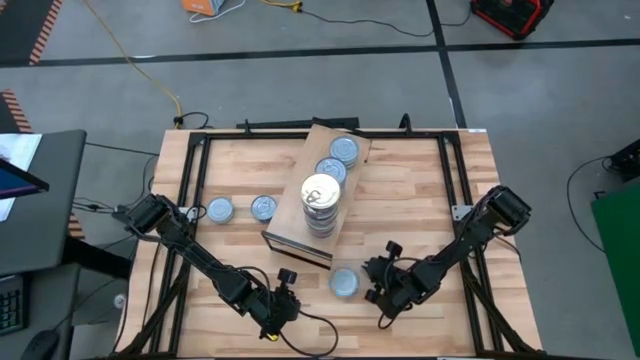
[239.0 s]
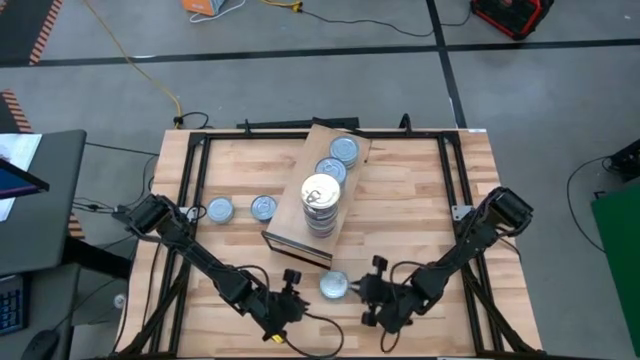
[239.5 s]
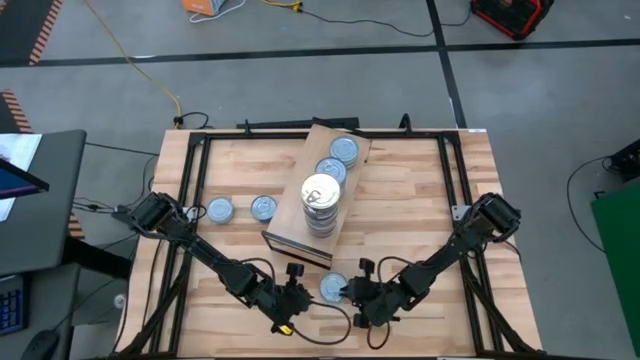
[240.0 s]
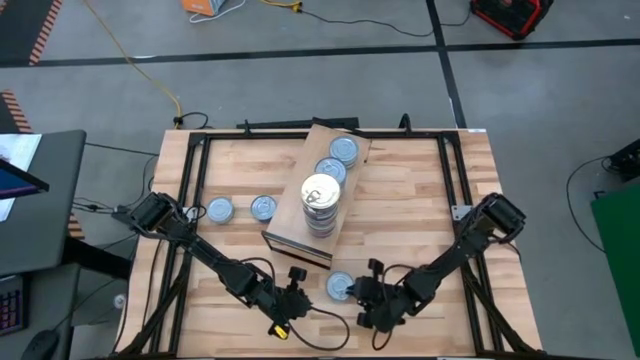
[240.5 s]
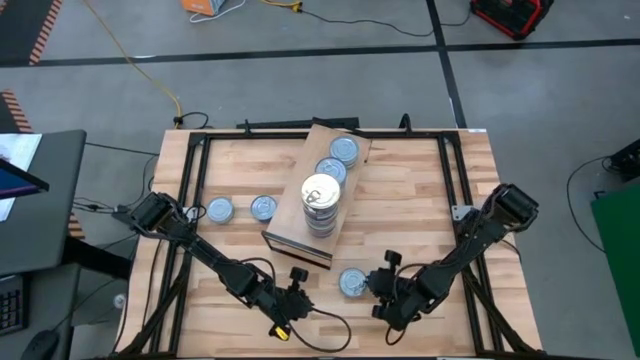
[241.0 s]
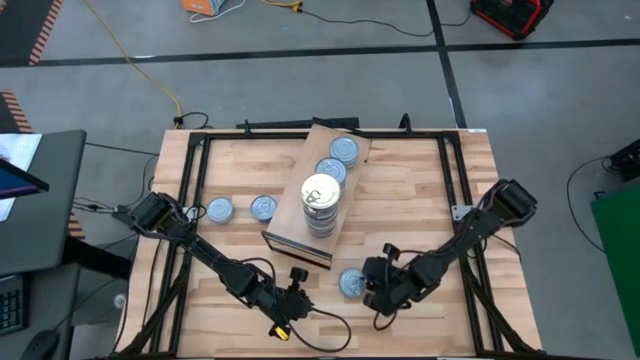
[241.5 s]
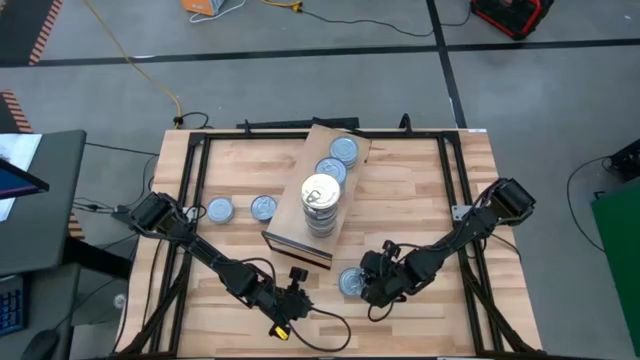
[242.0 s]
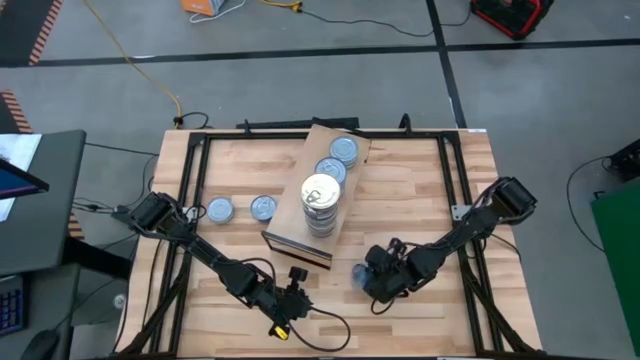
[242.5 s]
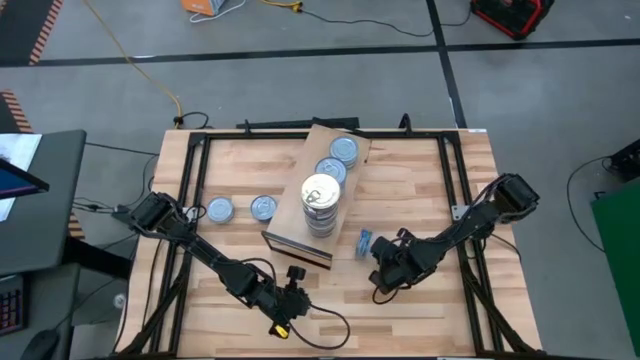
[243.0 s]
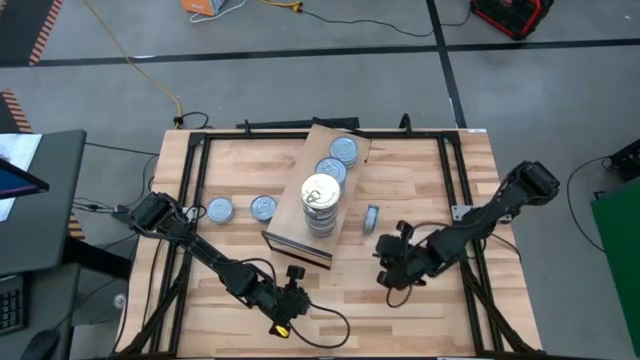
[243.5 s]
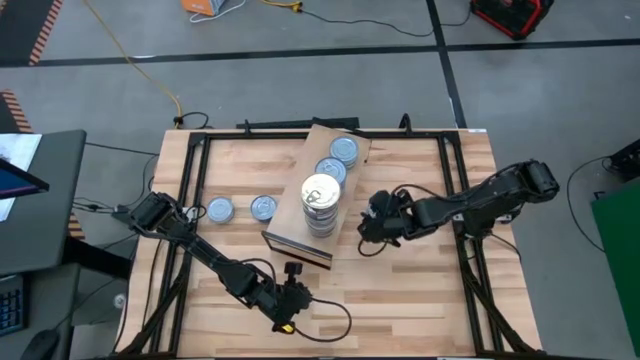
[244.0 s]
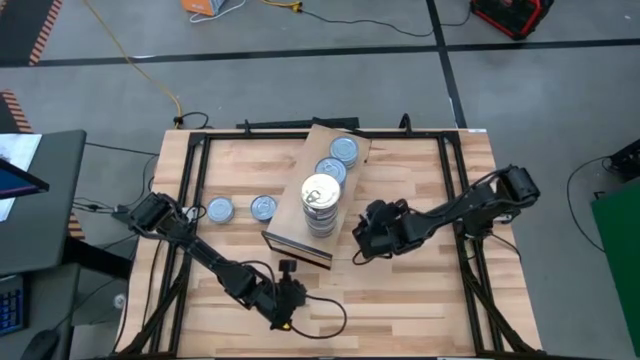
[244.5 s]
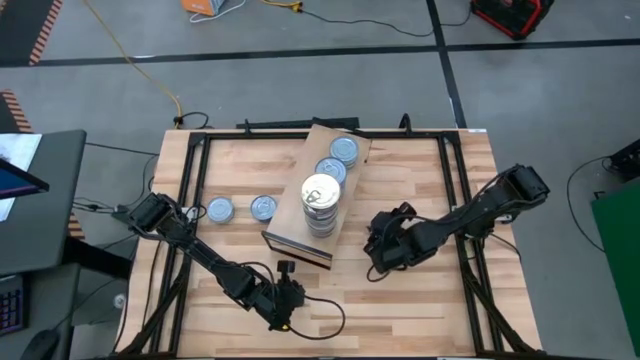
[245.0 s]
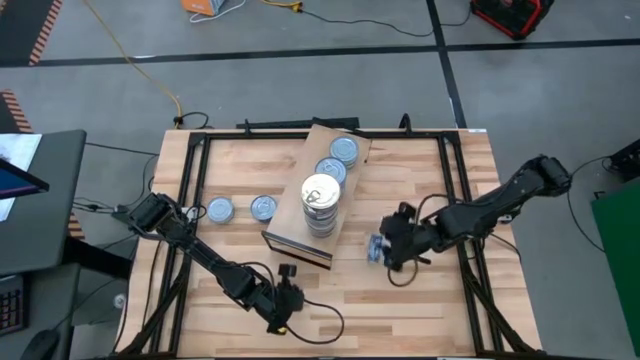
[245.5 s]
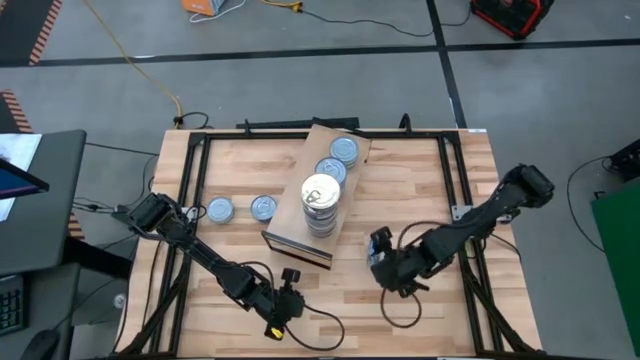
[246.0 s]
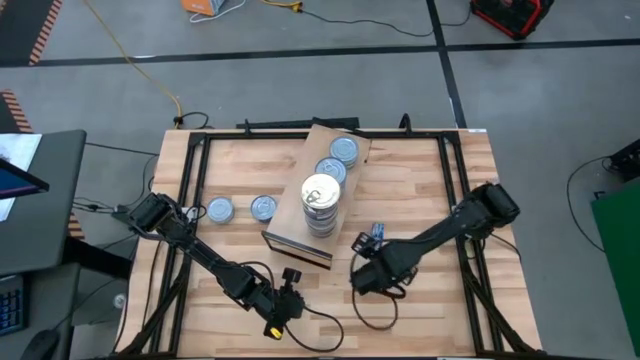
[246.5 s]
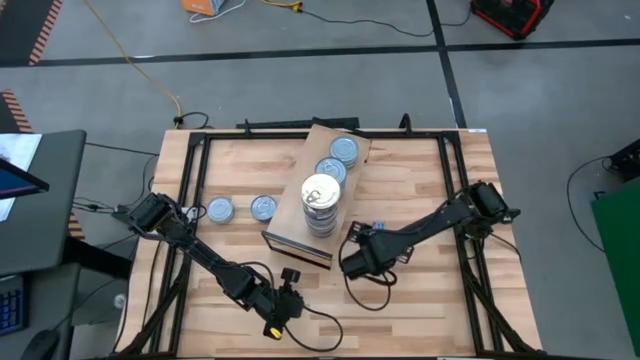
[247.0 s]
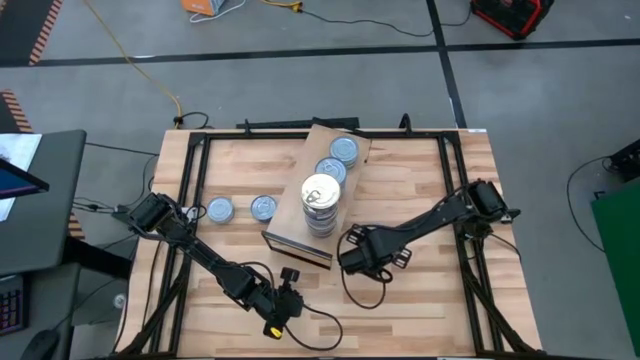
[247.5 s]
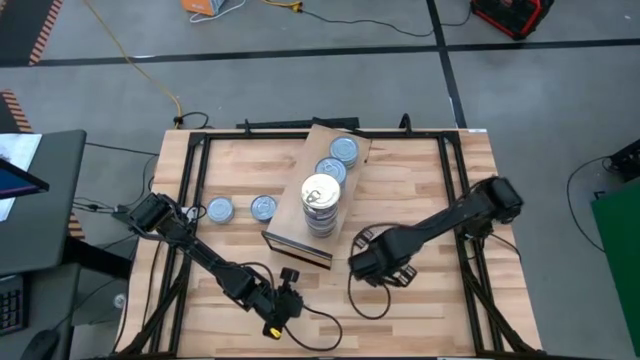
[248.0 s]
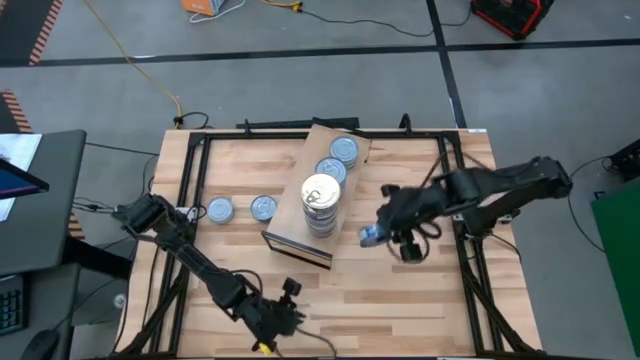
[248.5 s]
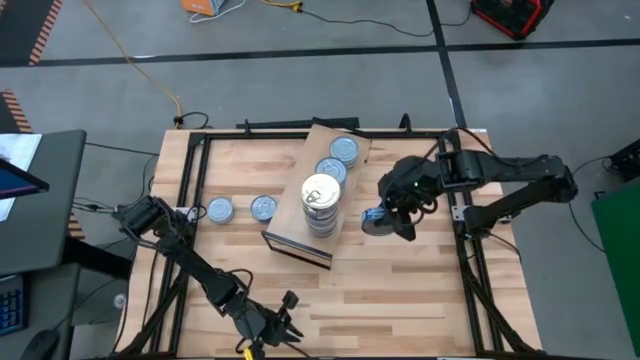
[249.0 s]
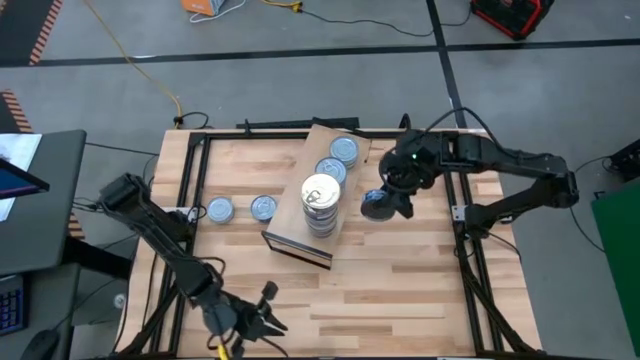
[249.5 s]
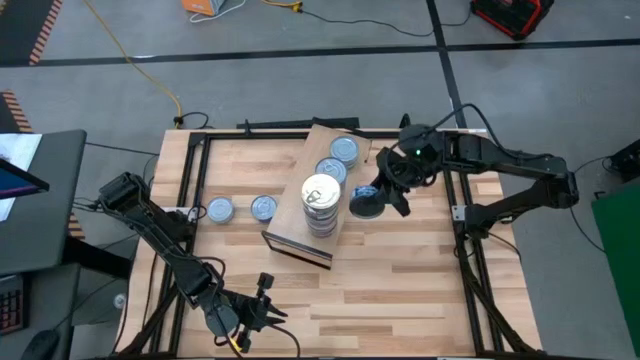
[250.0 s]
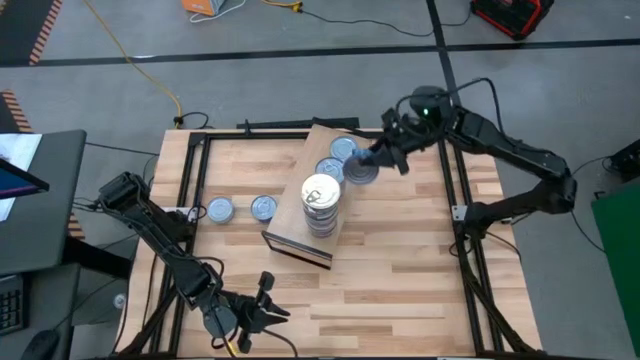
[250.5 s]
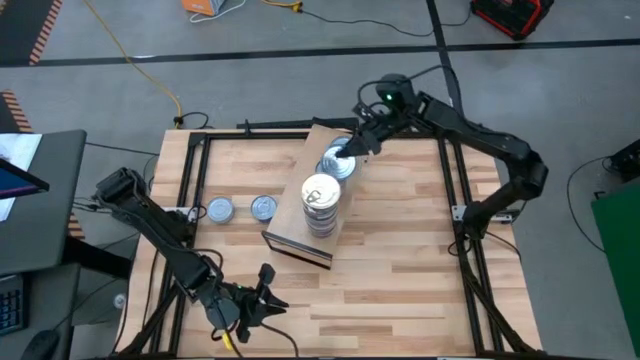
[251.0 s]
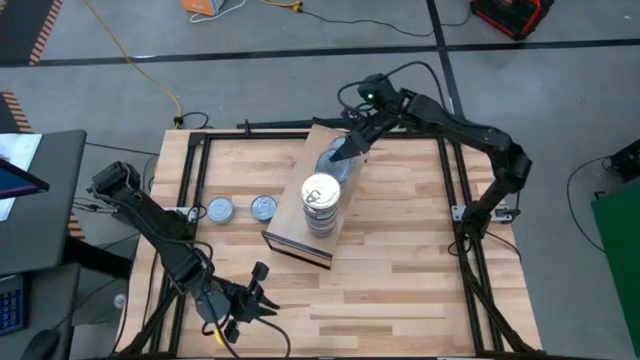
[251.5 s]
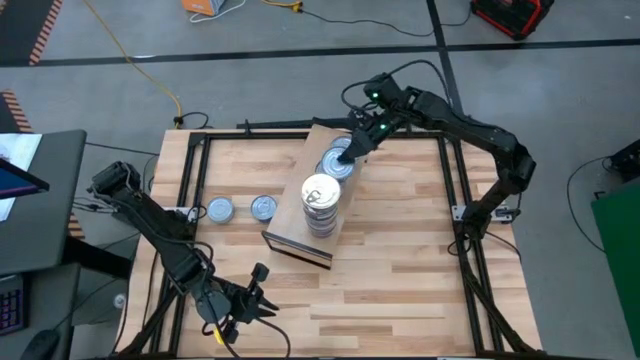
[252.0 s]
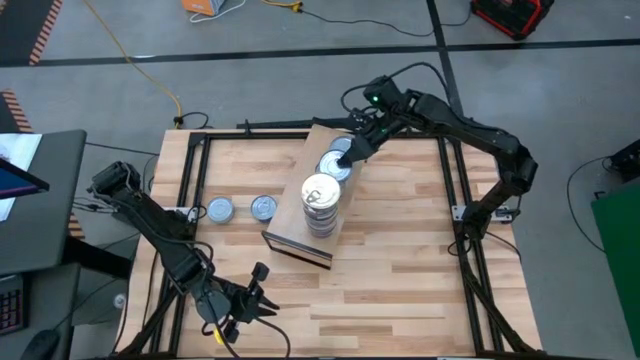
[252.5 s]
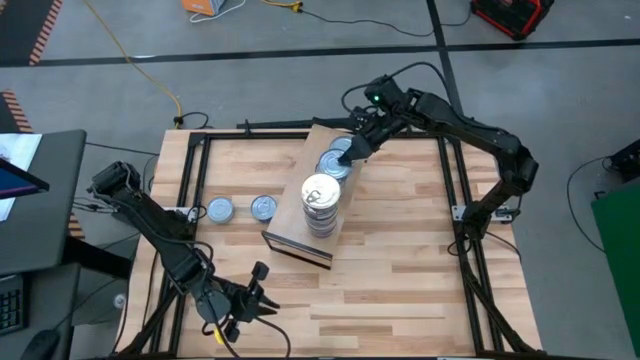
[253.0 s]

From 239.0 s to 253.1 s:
Task: Stack canned seafood by type on shelf
Stack the blue tuna can on top of the blue tuna can on the shelf

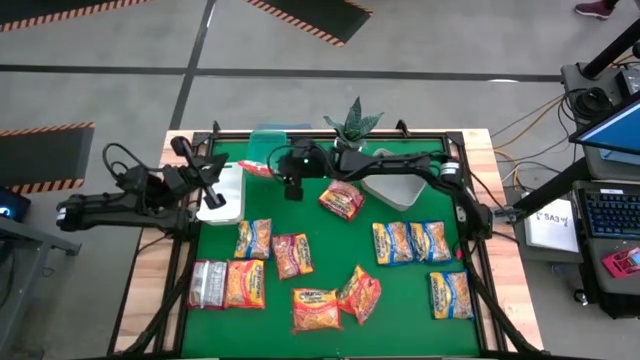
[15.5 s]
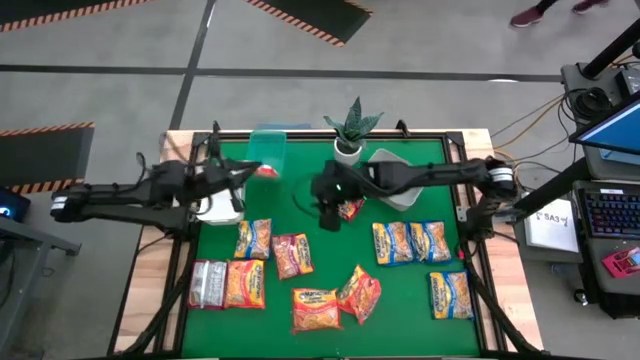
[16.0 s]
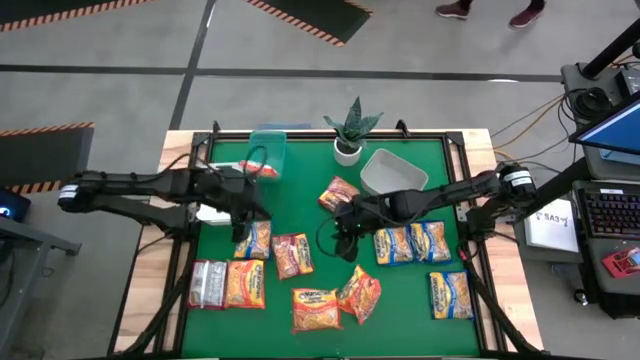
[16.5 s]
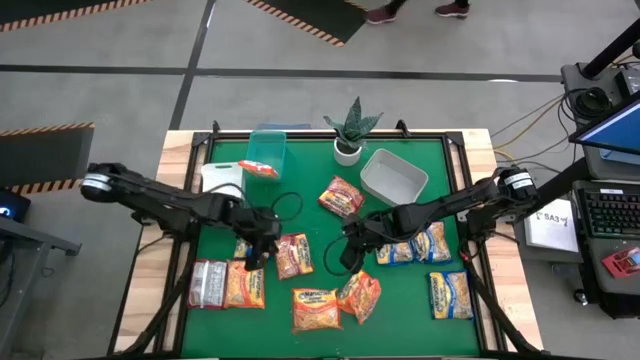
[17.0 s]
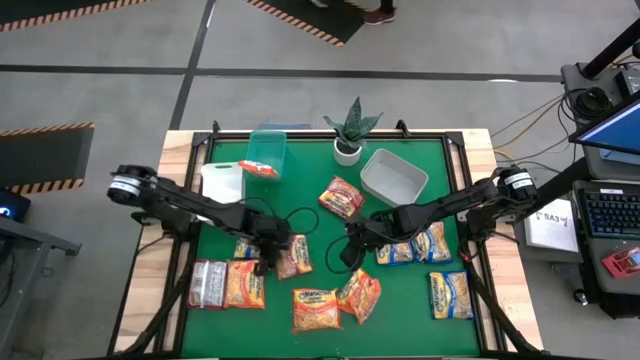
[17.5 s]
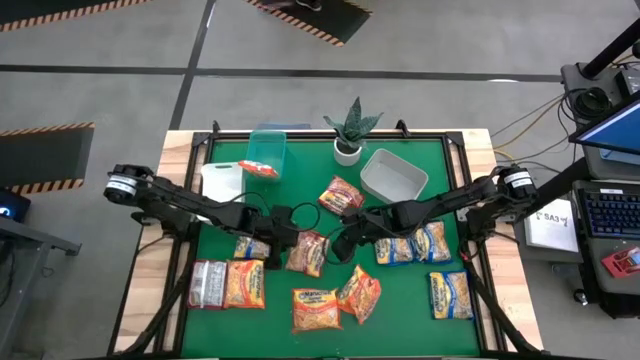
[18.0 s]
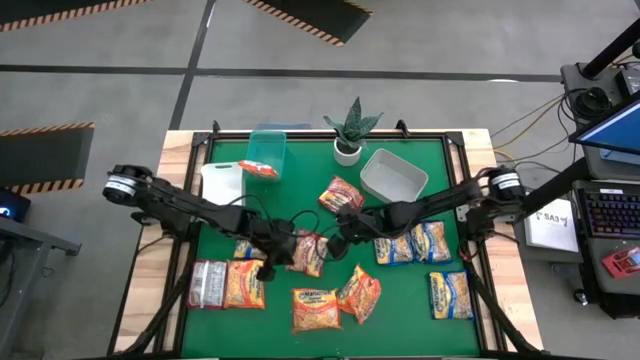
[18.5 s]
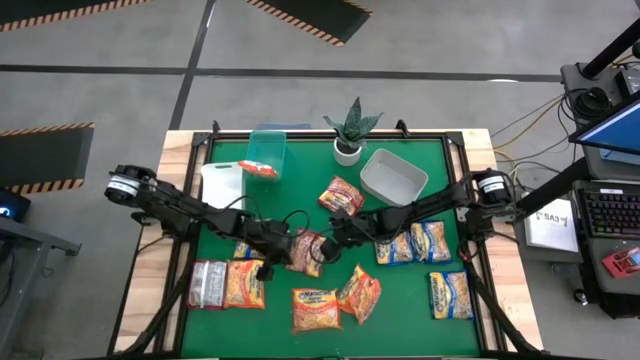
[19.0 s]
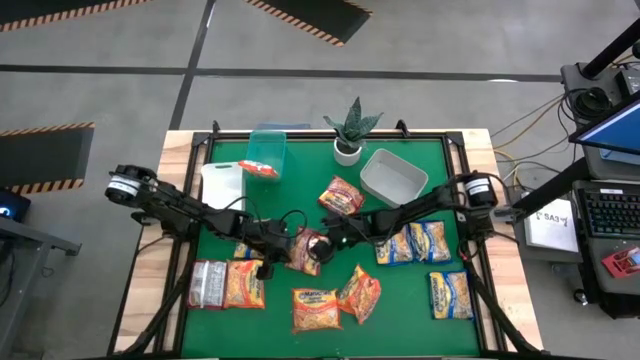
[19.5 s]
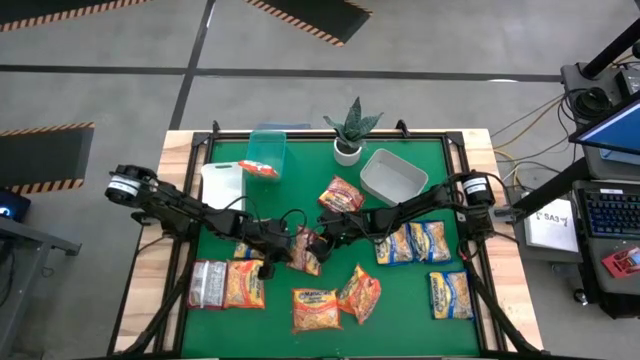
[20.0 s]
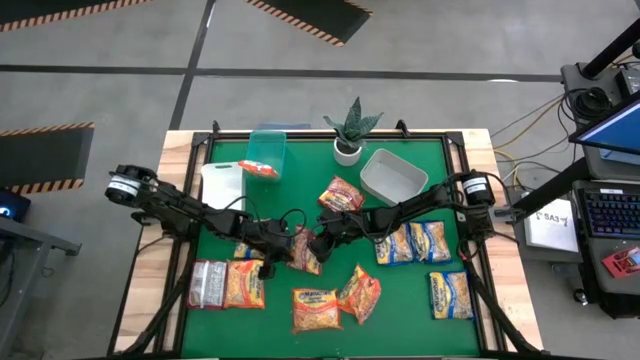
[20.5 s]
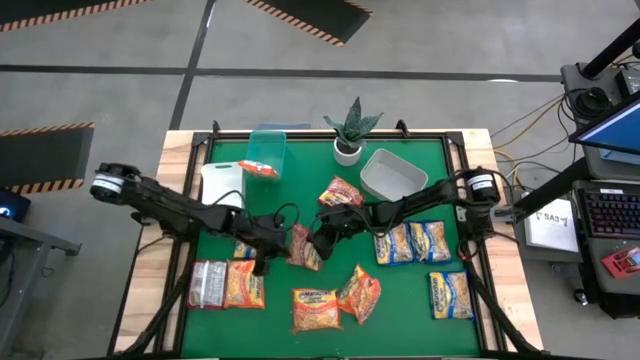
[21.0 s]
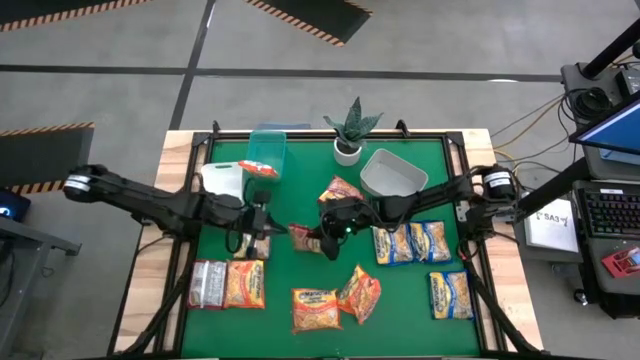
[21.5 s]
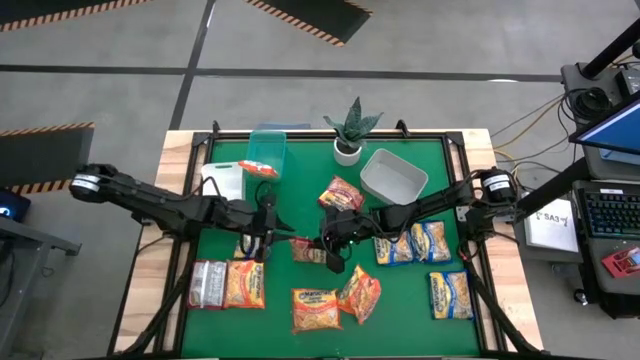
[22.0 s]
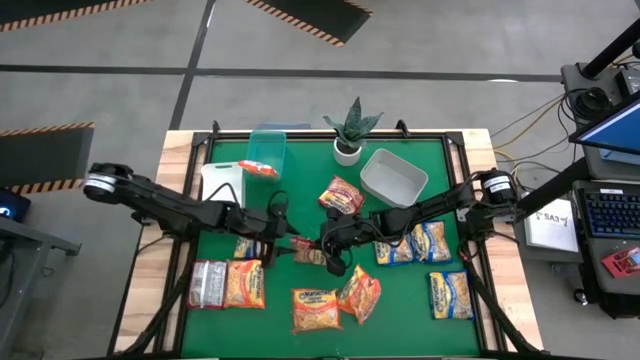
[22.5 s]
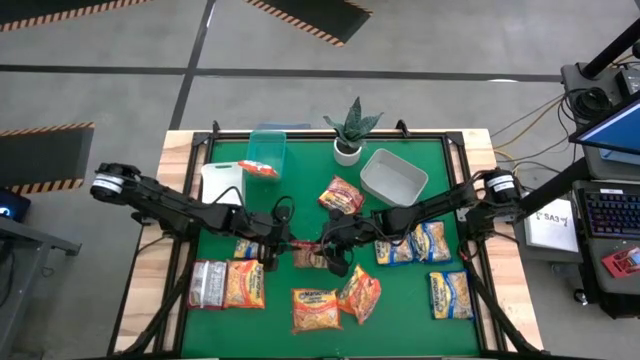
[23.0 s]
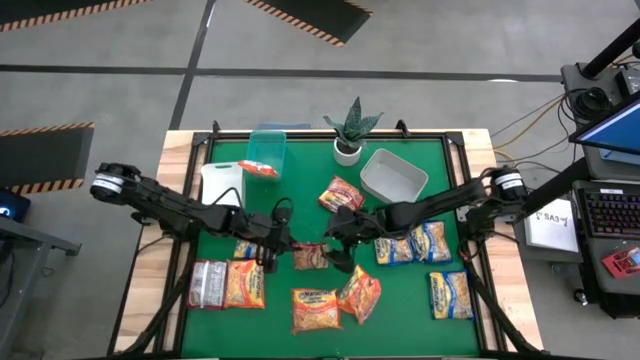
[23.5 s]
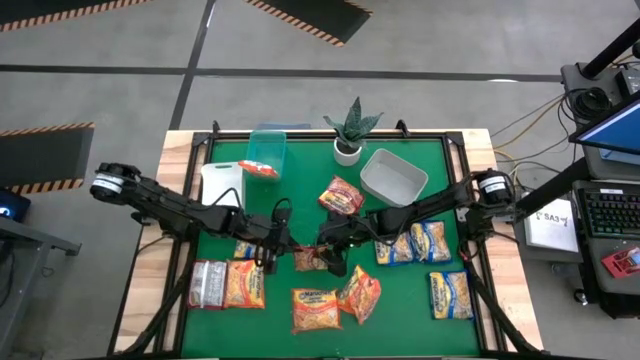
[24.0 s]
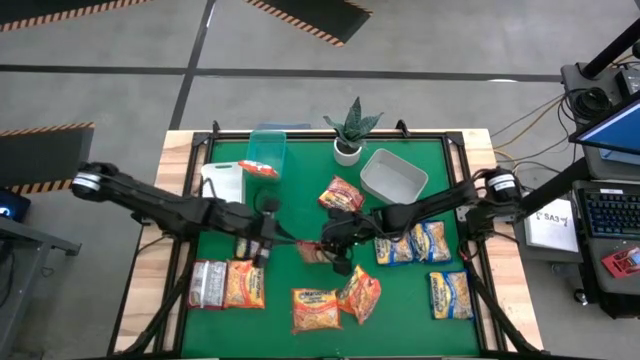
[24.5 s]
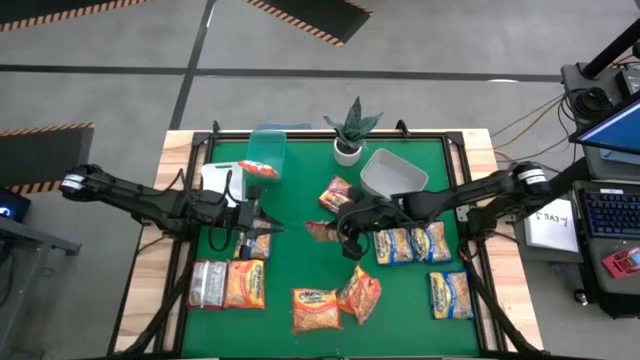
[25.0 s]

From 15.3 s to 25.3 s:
Task: Sort Maruchan noodles
Put the red noodle pack into the gray bin
